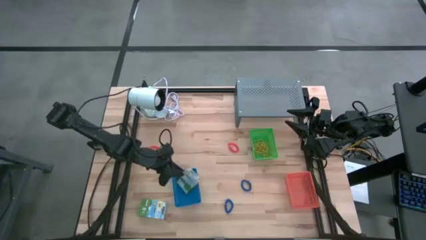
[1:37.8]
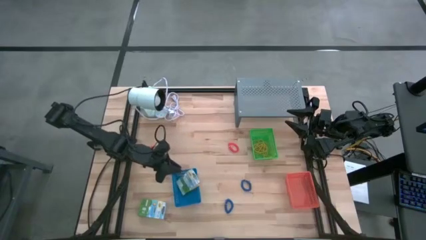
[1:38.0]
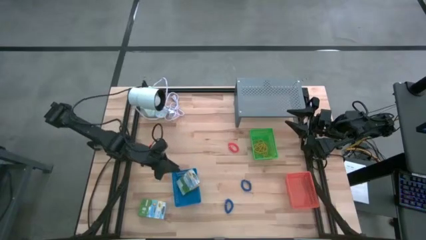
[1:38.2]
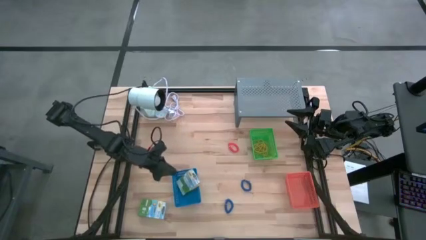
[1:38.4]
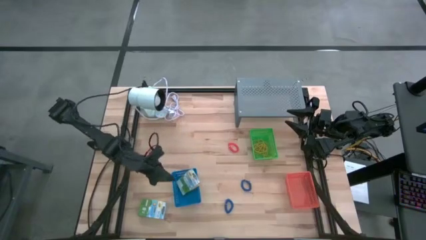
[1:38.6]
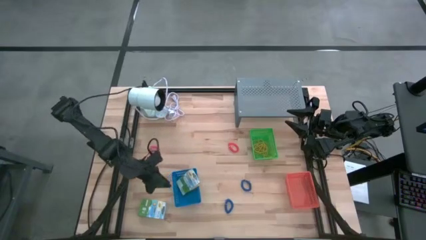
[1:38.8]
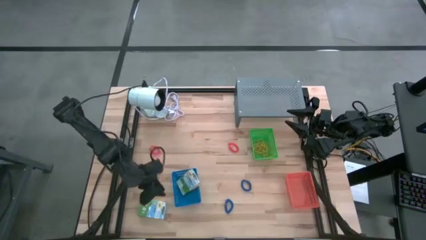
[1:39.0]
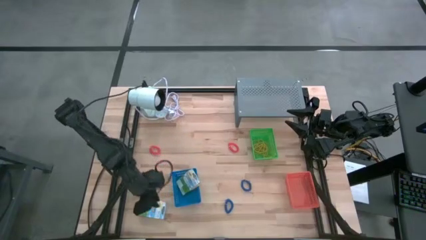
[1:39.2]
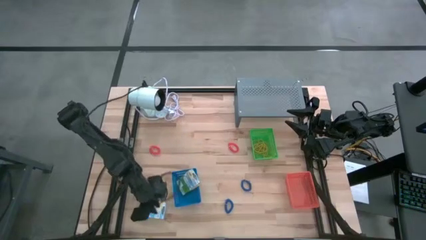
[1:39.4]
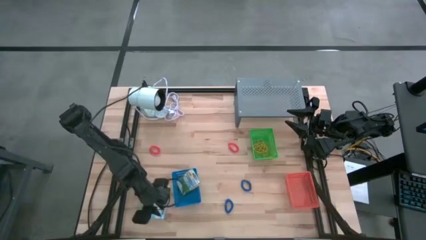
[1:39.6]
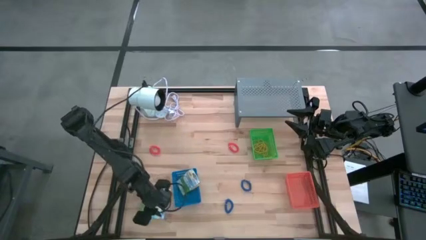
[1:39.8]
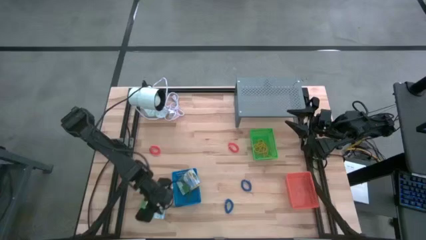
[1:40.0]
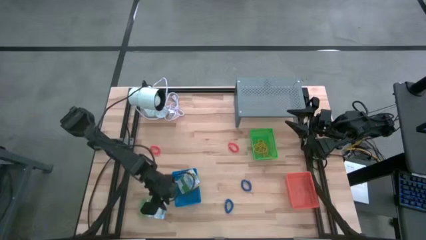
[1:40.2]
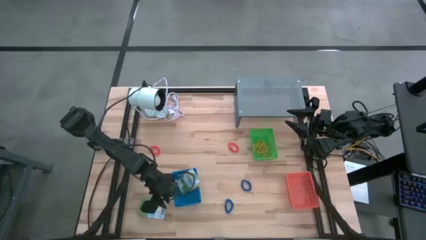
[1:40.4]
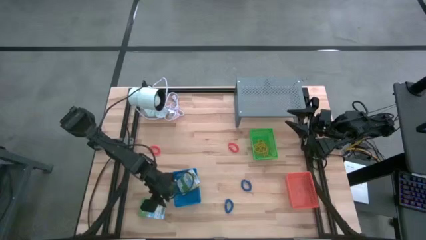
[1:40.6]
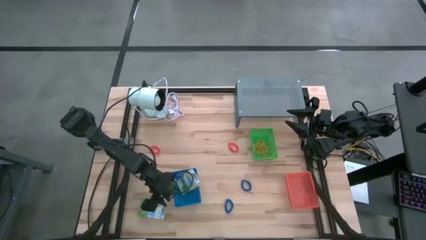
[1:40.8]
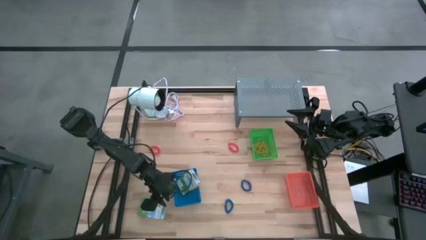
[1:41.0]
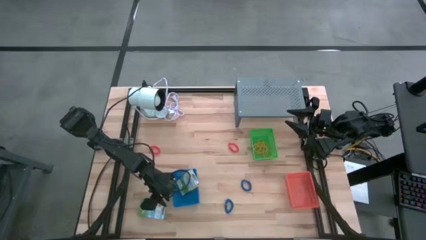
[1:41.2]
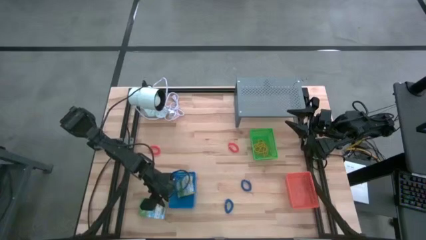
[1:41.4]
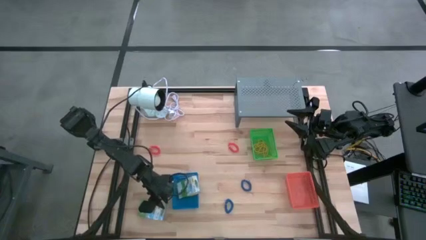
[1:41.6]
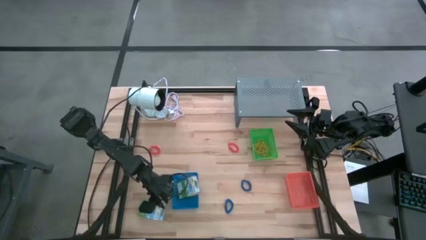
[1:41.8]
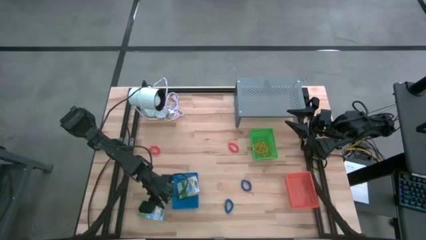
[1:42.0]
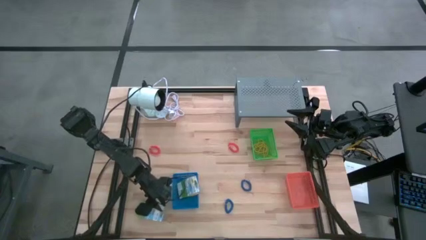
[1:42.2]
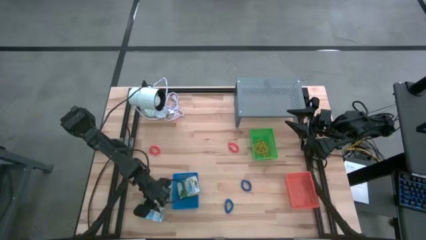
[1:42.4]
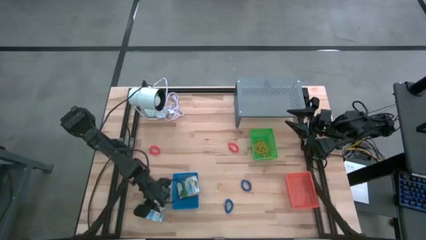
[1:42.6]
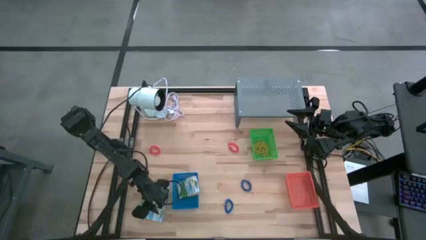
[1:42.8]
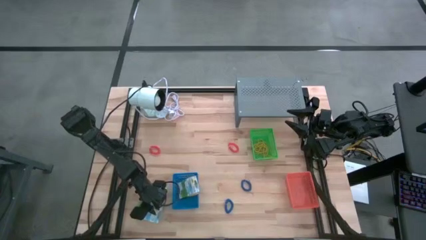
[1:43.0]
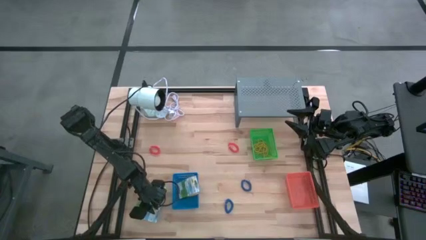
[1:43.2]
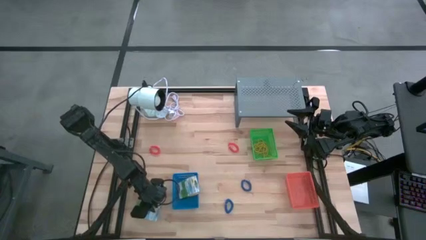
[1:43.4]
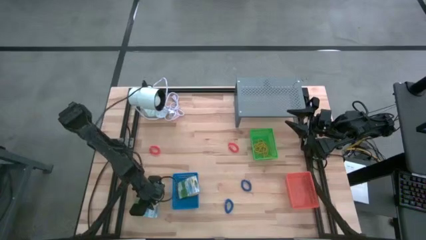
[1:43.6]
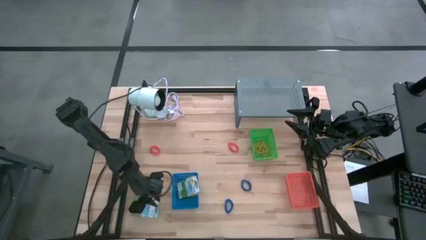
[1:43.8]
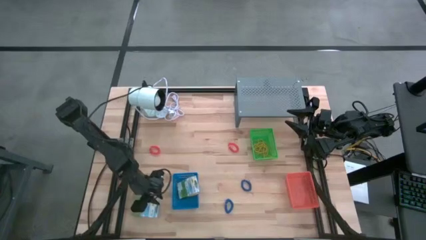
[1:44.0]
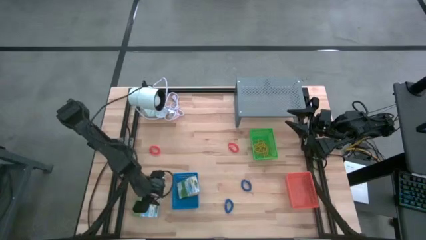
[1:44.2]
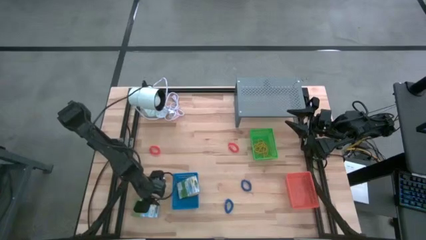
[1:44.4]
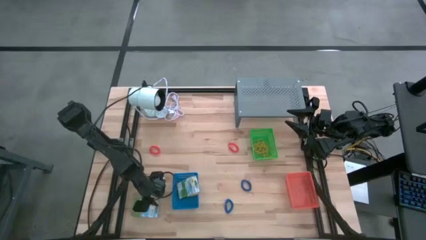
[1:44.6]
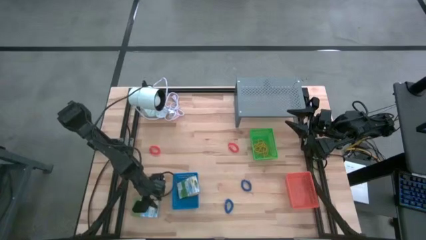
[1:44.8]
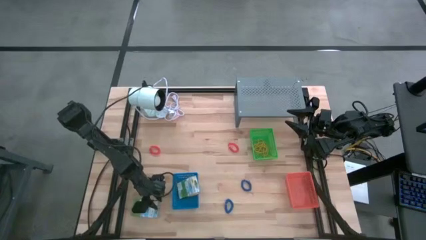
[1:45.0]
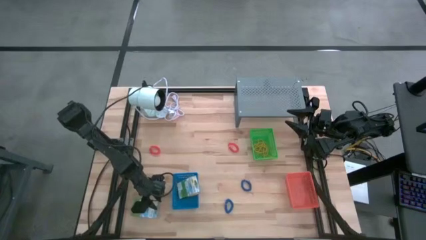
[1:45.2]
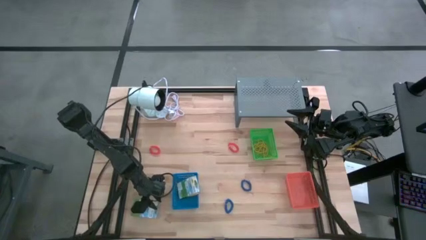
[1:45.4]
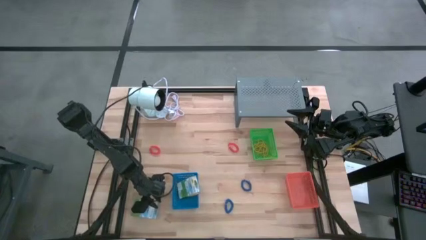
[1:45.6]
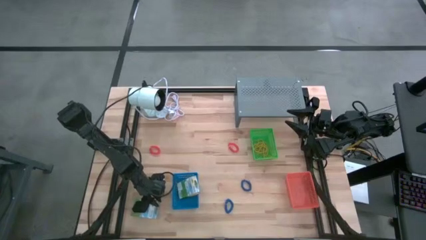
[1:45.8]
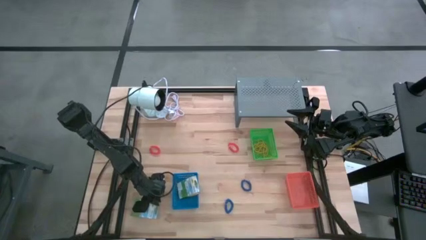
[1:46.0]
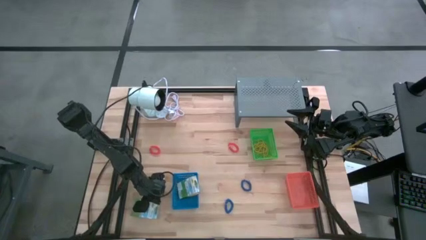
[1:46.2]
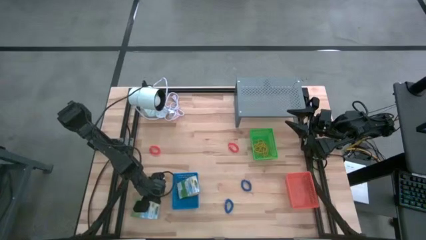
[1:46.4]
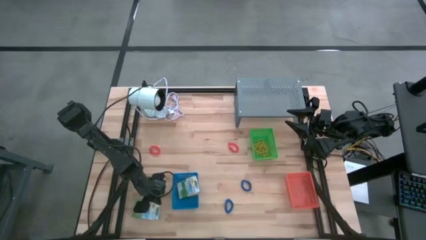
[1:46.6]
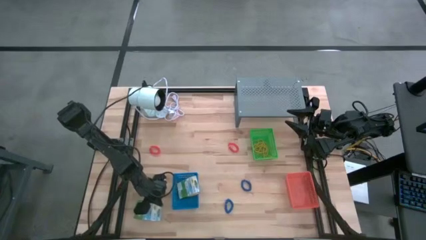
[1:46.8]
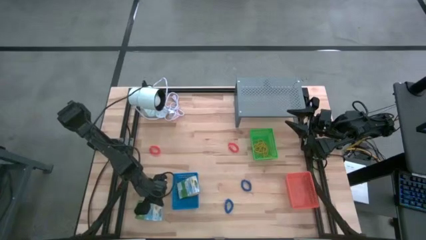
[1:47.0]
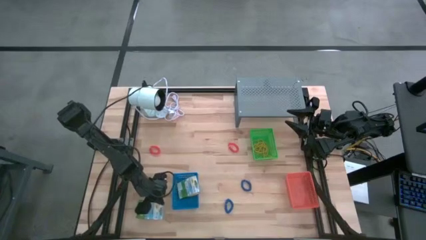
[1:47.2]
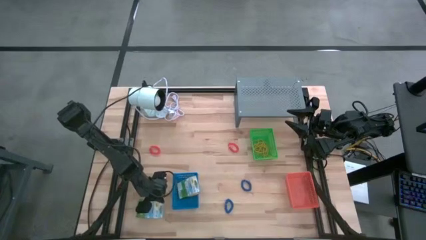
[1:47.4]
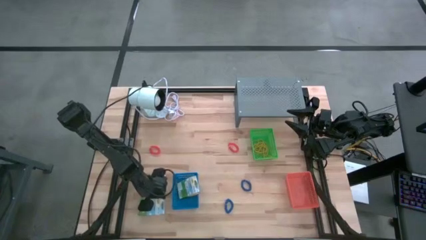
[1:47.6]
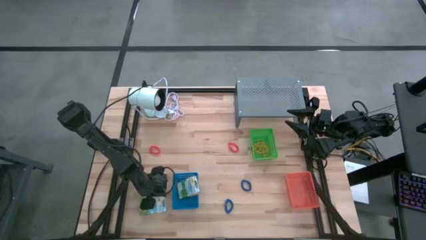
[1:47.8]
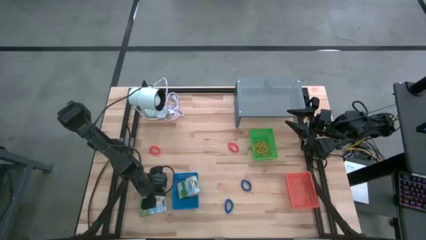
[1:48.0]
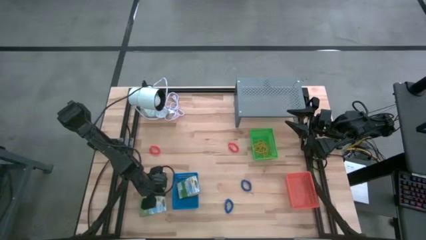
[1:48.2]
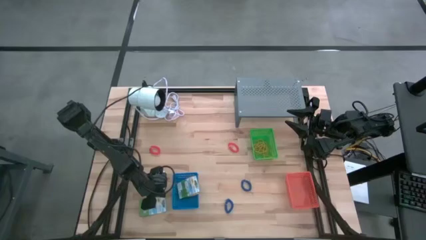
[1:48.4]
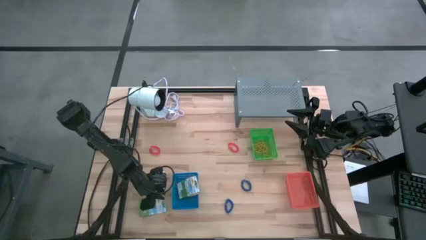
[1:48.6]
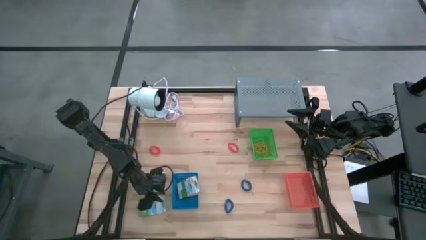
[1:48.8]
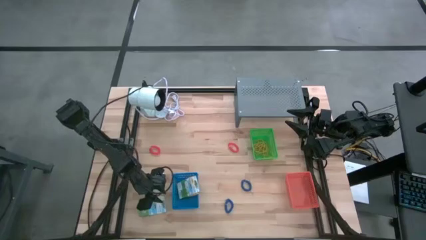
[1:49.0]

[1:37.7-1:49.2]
Task: Pick & Place Office Desk Supplies
Put the crayon box into the blue bin

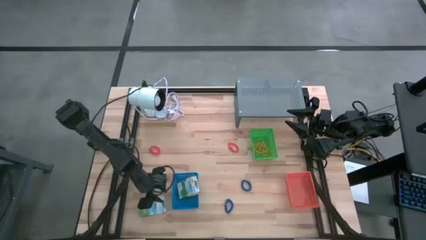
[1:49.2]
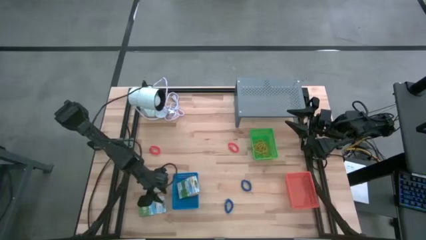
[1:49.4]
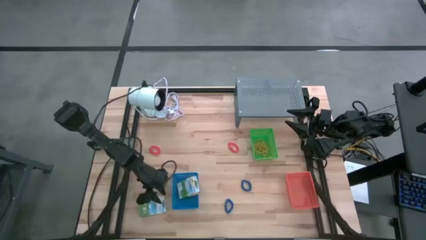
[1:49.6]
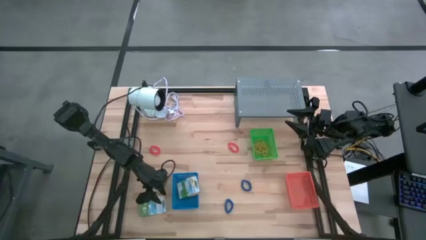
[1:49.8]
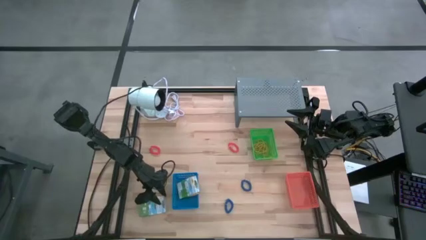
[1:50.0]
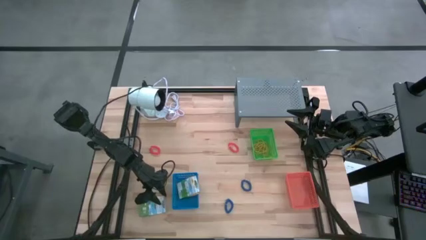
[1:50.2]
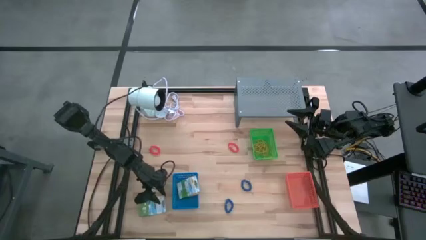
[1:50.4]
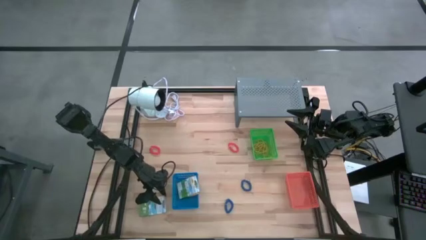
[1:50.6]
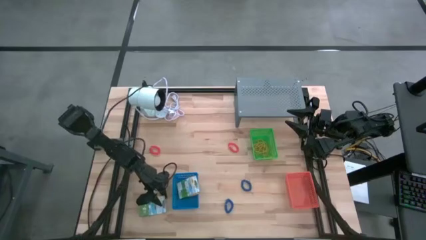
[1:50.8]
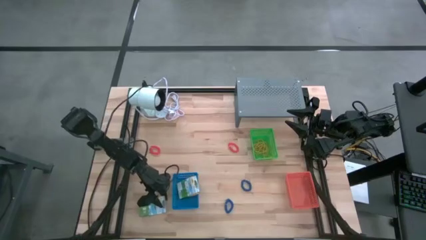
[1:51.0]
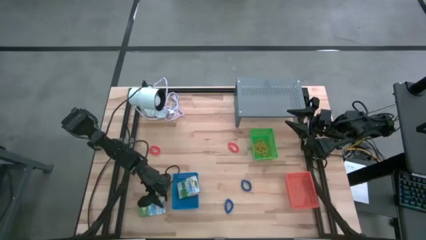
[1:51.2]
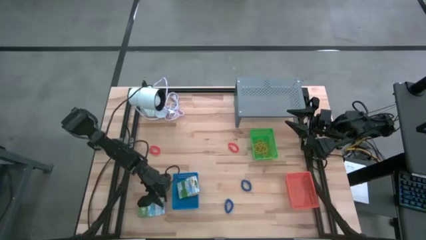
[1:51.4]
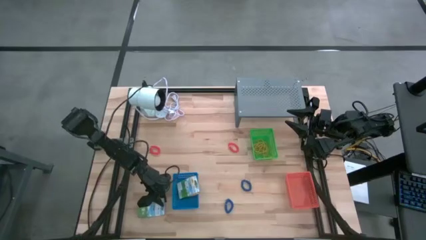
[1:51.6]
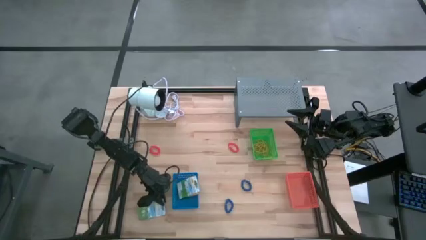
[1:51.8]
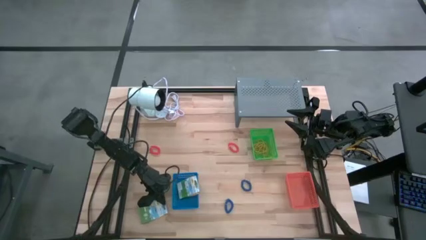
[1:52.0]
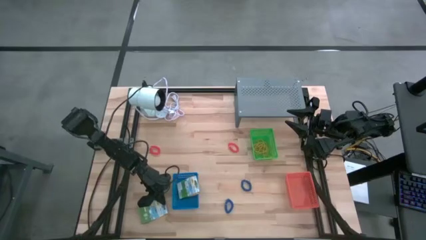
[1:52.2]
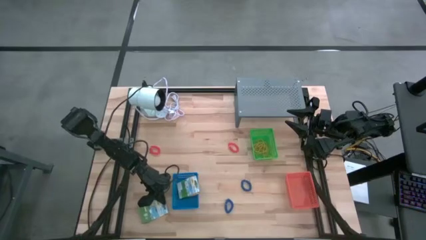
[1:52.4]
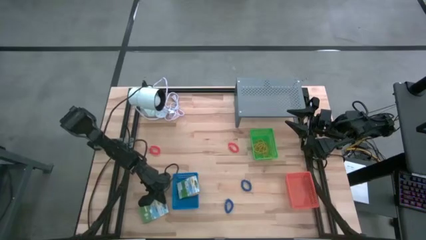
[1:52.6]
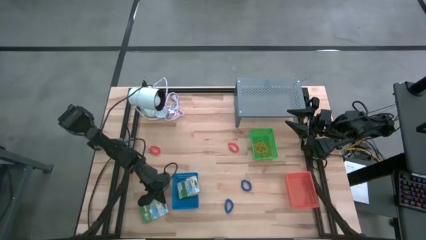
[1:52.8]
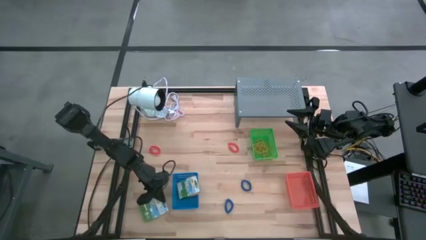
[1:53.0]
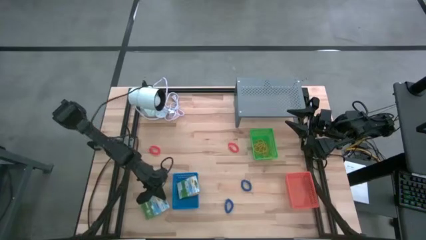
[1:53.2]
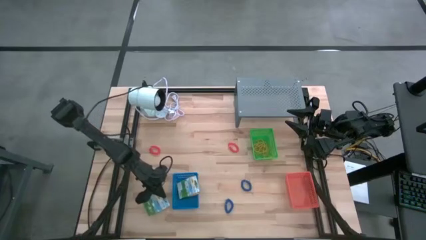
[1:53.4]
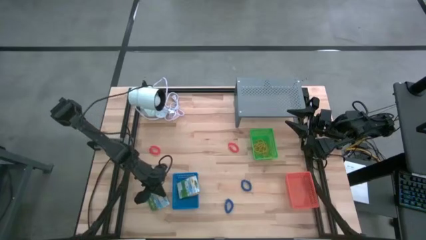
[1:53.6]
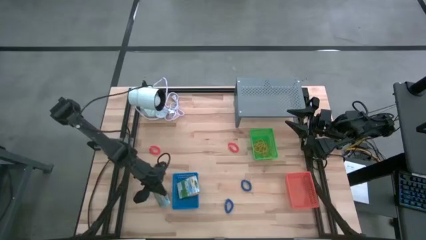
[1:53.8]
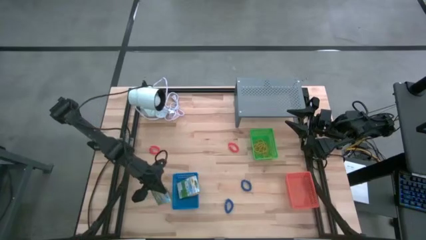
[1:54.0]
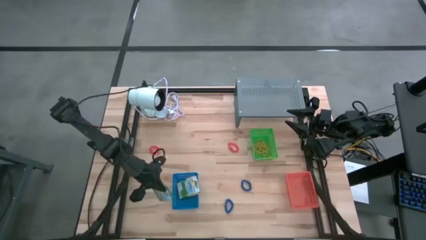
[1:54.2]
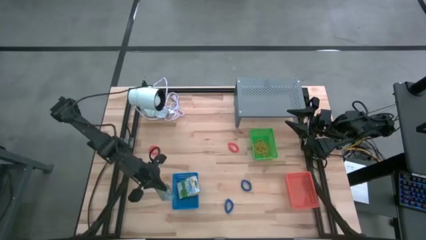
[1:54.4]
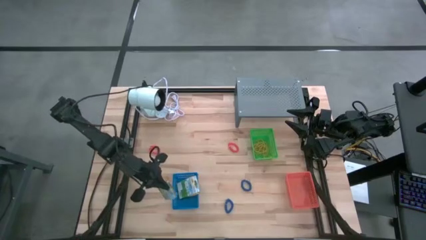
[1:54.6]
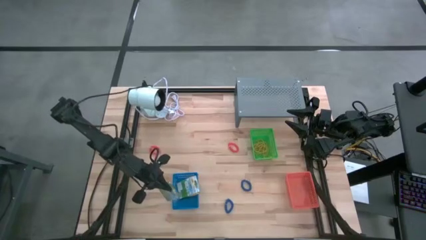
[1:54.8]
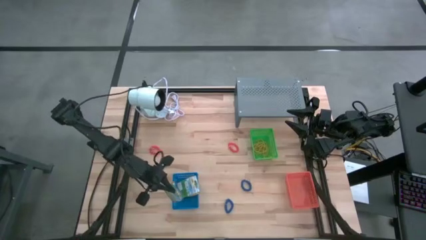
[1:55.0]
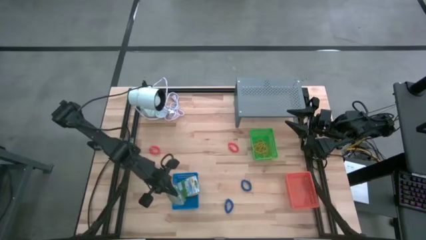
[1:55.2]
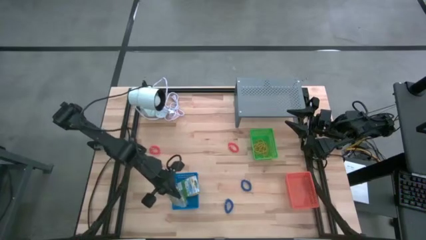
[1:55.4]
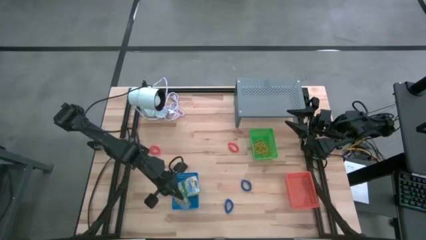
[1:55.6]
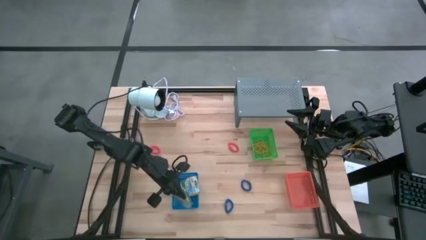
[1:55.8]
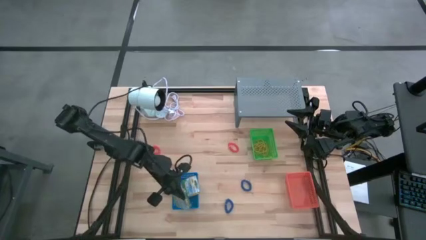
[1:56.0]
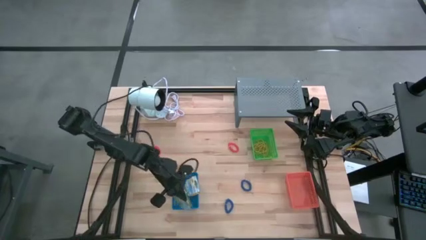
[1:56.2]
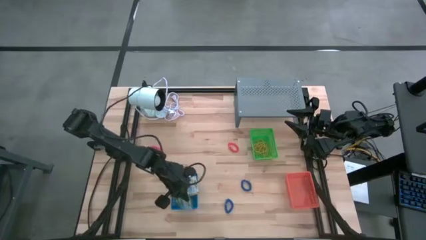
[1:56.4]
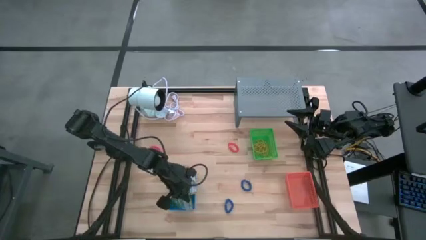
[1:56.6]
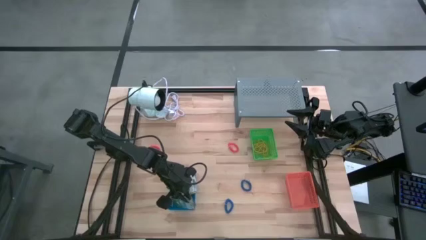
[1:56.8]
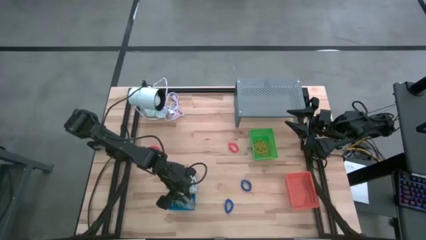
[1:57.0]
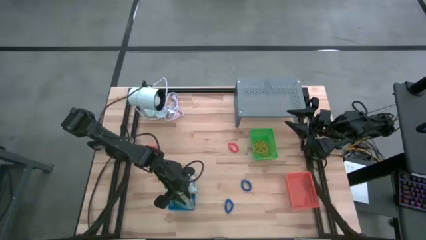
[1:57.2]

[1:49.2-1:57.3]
Put the crayon box into the blue bin
